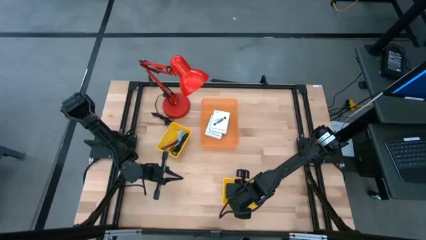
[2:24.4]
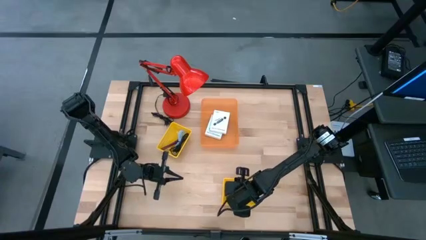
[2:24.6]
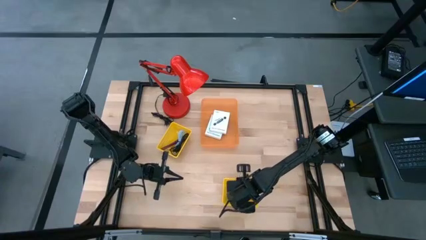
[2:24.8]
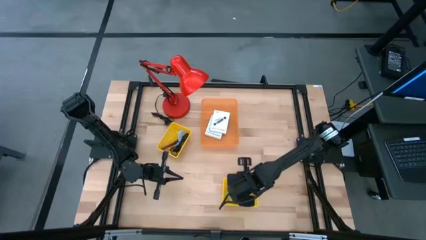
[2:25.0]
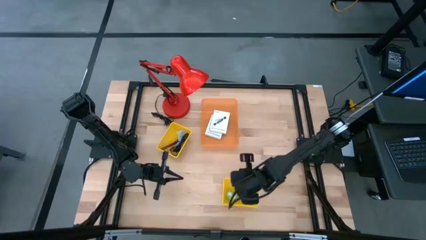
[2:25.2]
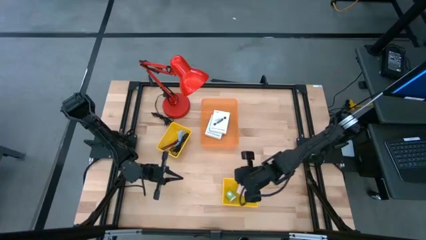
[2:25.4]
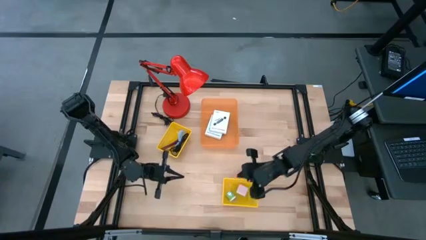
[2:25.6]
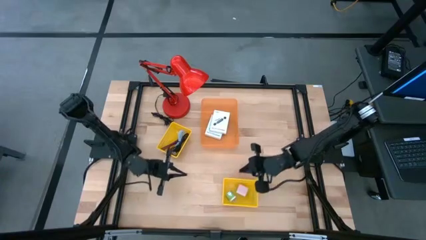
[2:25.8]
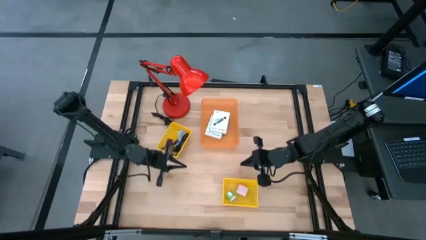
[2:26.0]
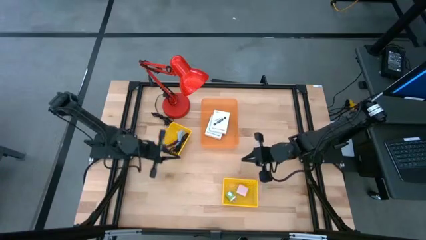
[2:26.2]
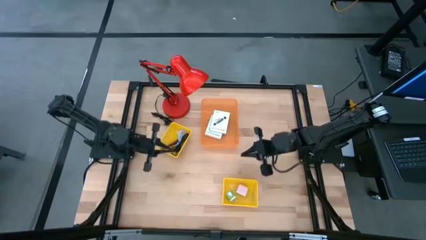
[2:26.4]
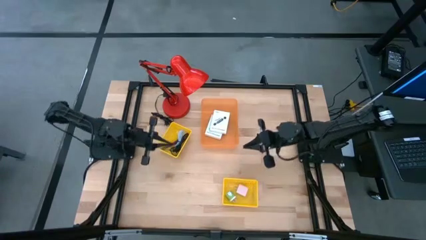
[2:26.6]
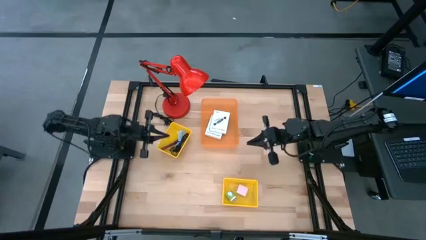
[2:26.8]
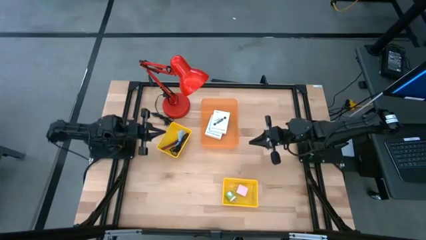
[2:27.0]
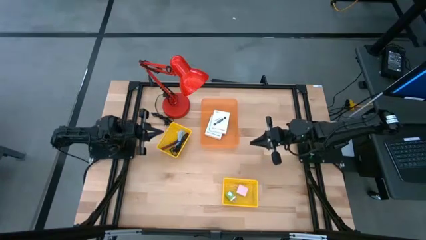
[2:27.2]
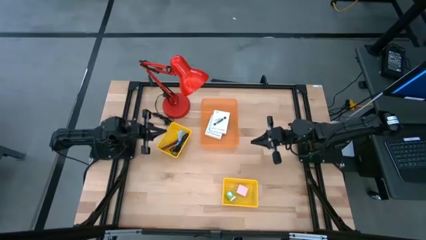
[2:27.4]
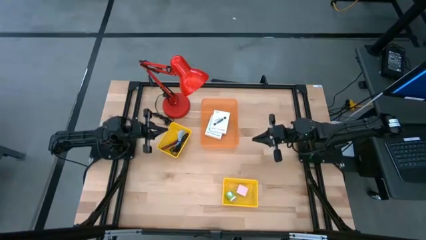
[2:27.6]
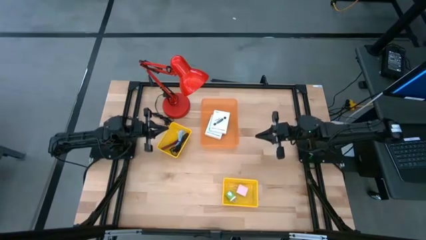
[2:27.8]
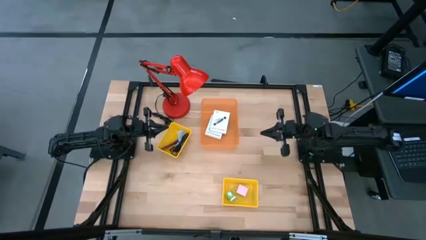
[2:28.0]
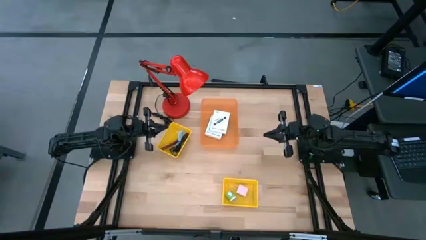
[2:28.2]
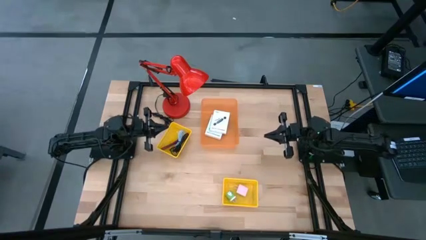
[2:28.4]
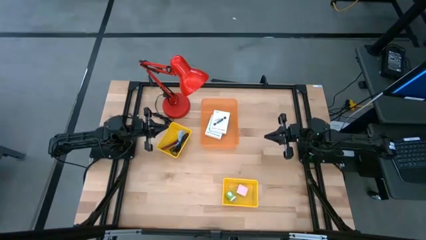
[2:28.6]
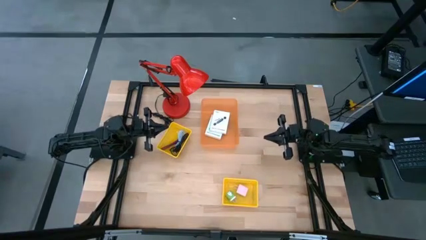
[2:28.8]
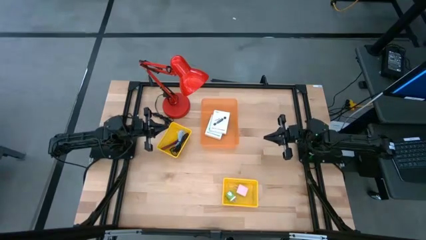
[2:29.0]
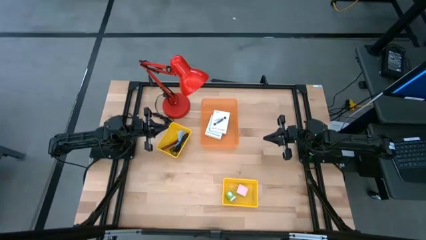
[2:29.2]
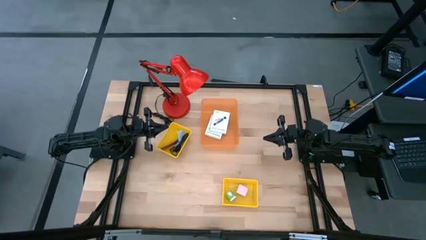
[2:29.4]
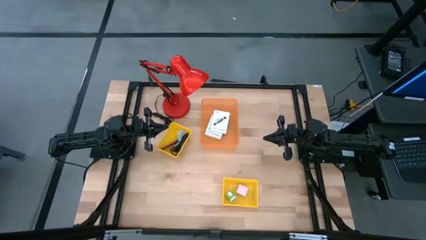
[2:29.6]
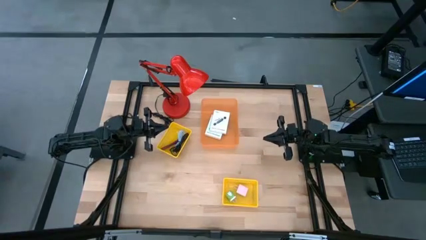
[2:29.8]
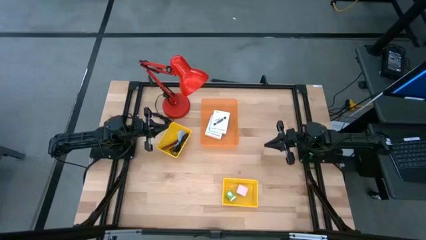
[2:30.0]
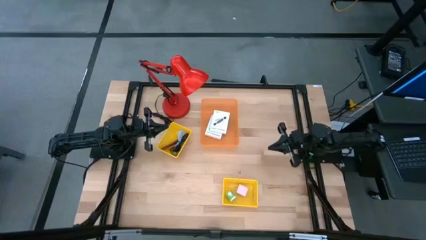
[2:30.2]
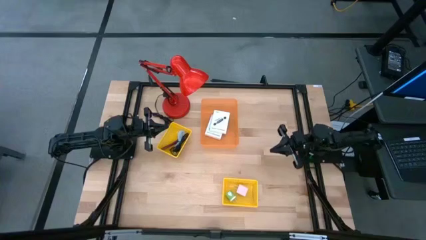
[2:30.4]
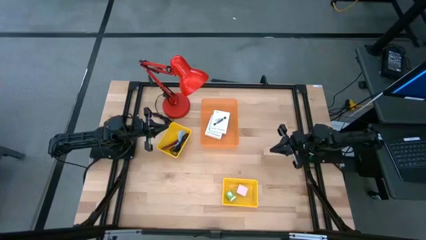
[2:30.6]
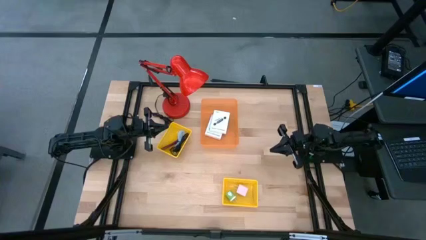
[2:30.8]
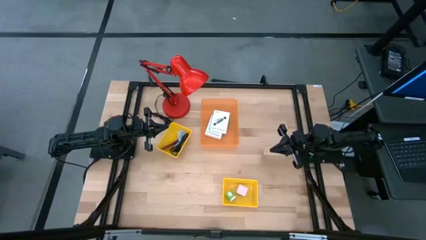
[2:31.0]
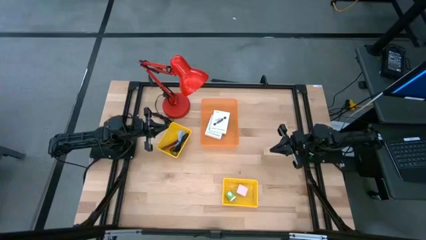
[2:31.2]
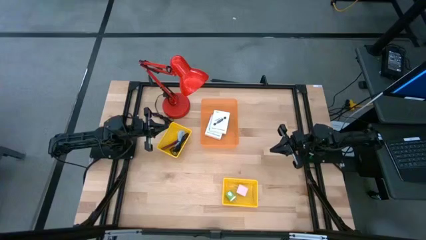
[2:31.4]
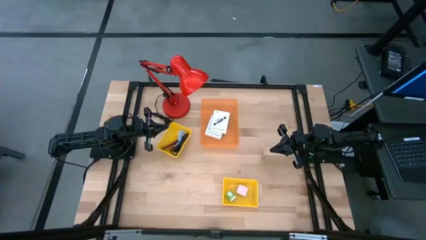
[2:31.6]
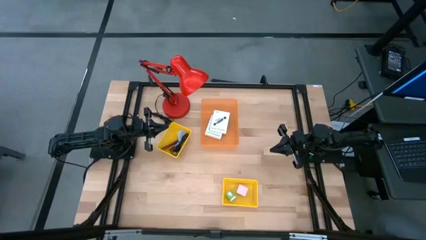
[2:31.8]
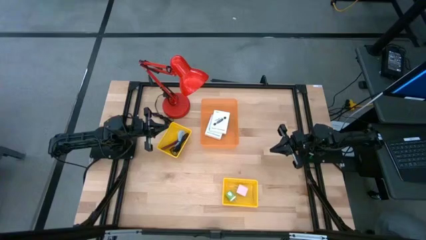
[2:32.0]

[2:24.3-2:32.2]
Task: Pick and place items into bin
Return to Home Position

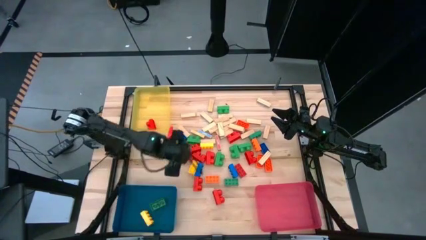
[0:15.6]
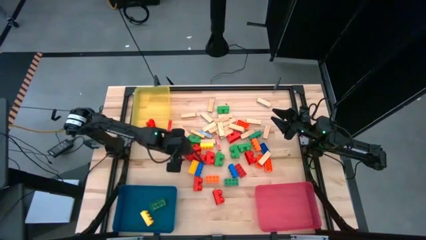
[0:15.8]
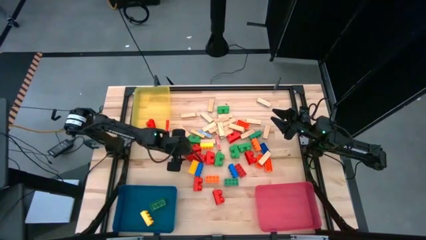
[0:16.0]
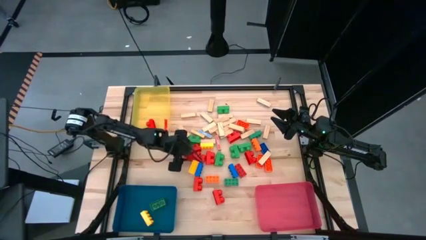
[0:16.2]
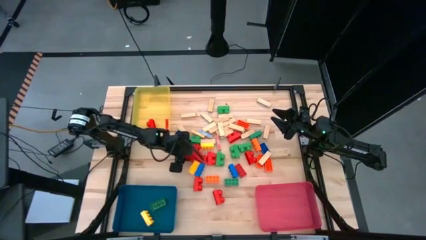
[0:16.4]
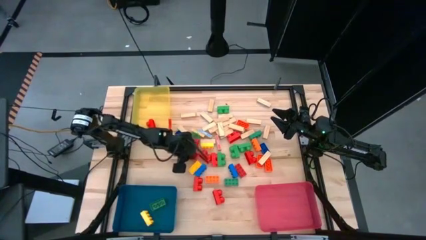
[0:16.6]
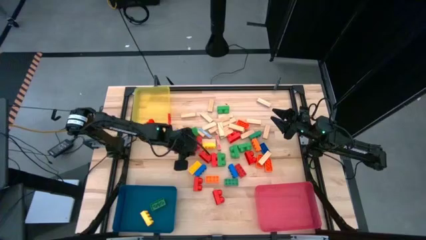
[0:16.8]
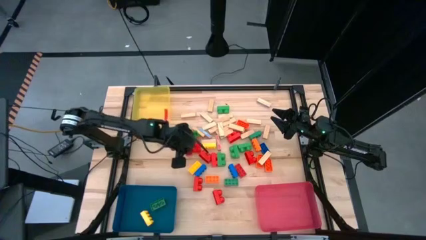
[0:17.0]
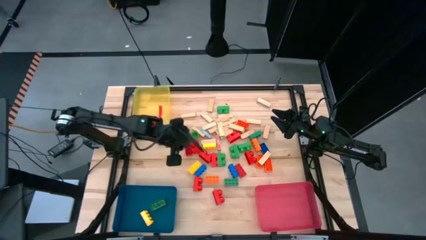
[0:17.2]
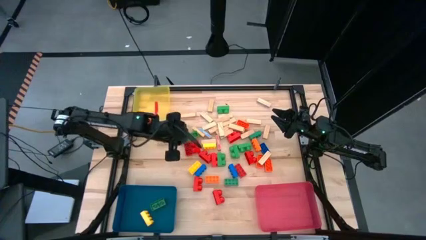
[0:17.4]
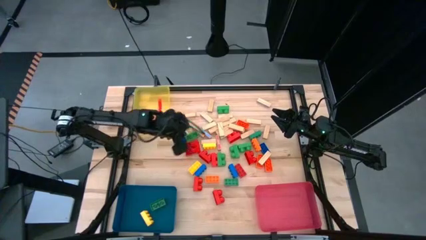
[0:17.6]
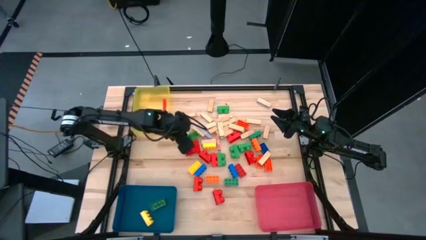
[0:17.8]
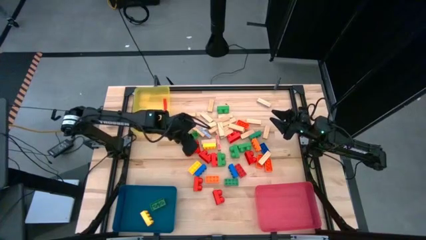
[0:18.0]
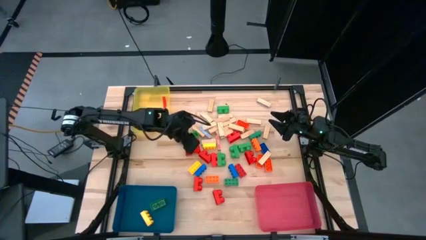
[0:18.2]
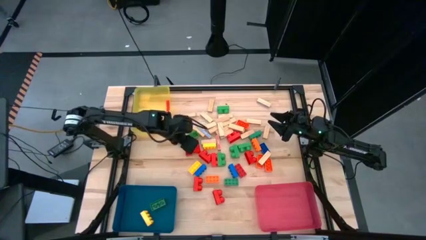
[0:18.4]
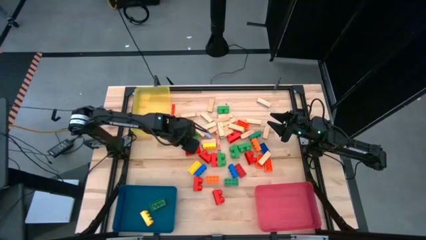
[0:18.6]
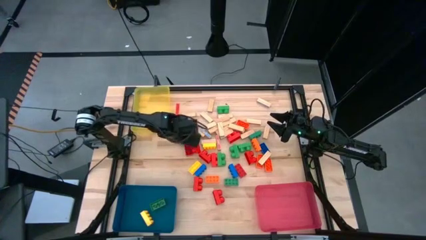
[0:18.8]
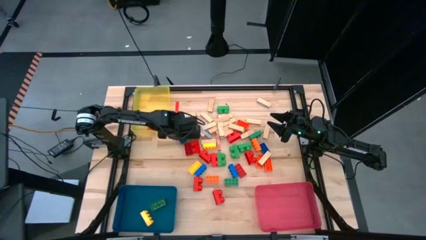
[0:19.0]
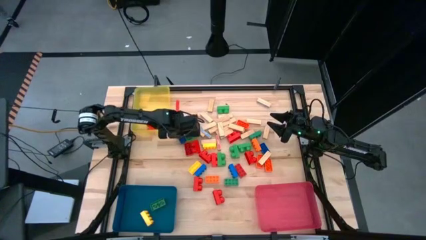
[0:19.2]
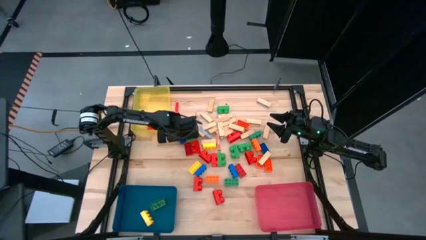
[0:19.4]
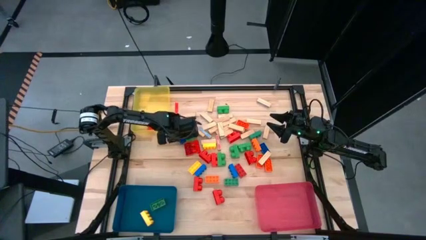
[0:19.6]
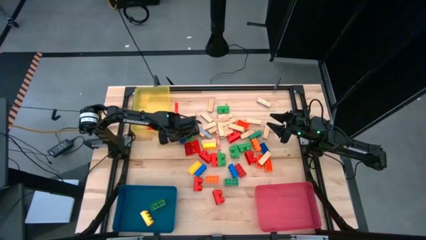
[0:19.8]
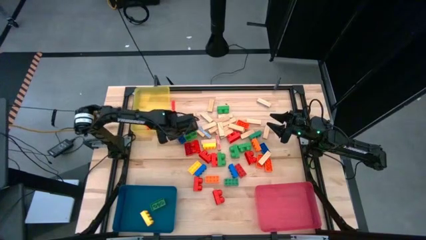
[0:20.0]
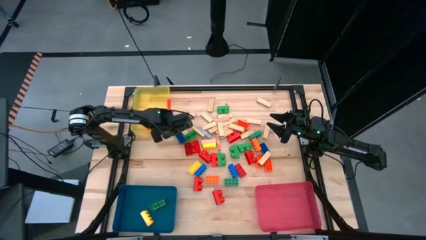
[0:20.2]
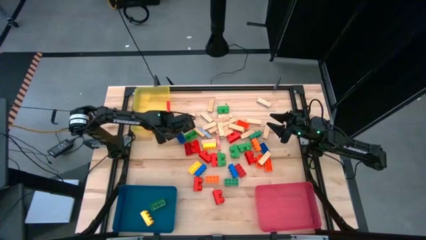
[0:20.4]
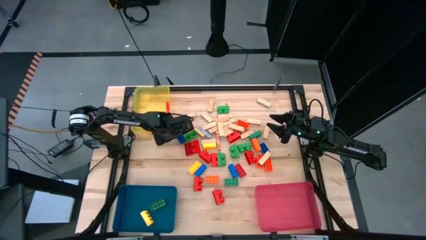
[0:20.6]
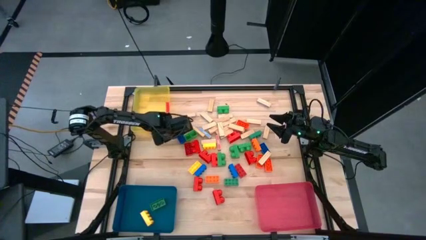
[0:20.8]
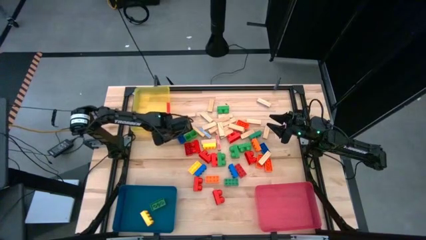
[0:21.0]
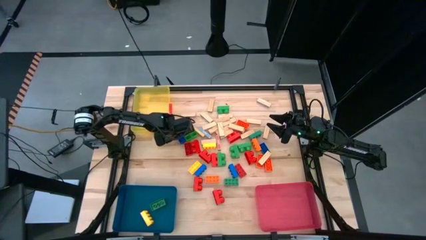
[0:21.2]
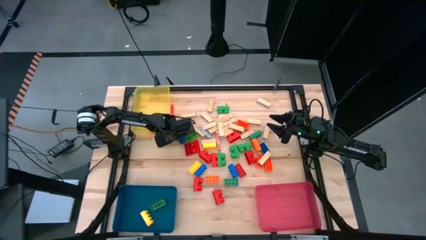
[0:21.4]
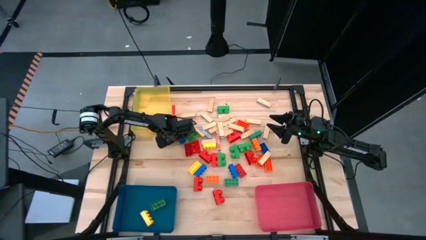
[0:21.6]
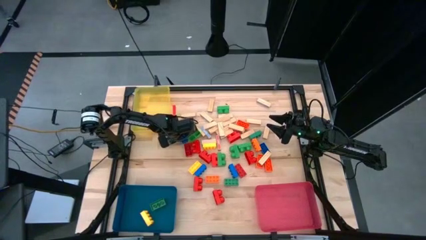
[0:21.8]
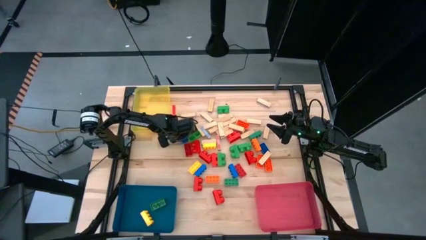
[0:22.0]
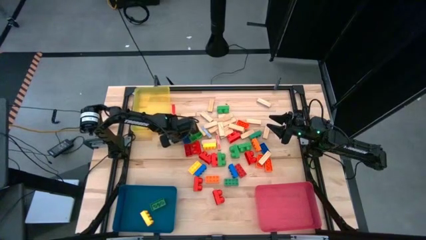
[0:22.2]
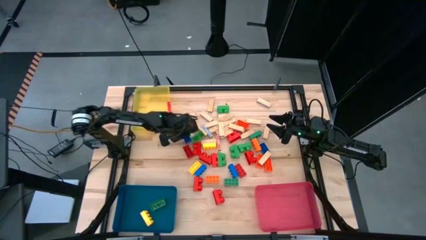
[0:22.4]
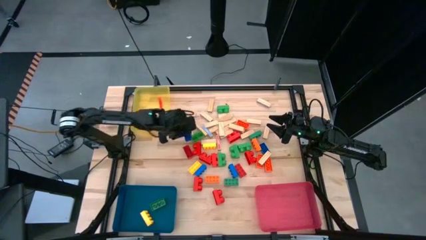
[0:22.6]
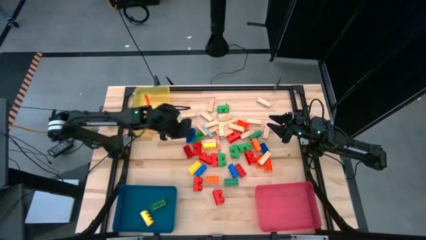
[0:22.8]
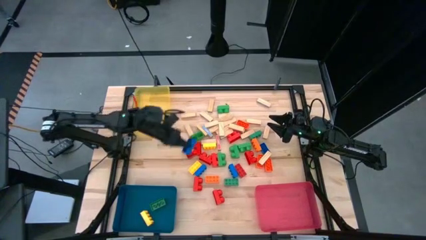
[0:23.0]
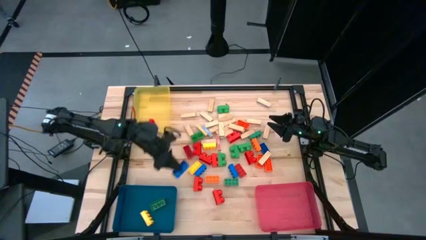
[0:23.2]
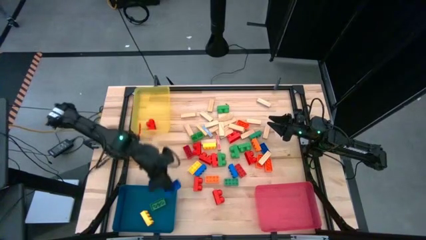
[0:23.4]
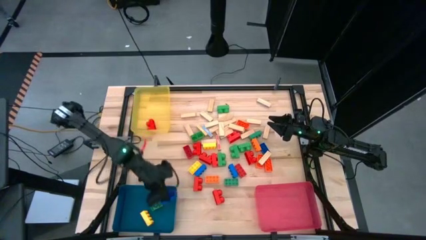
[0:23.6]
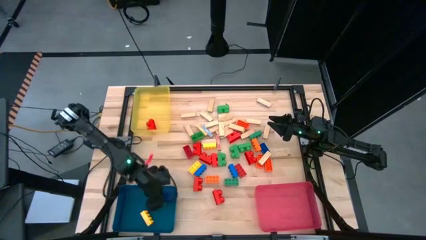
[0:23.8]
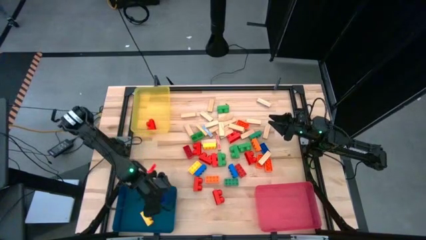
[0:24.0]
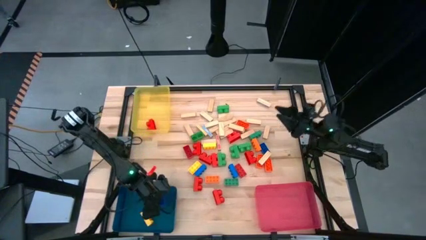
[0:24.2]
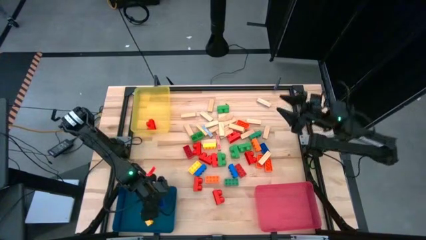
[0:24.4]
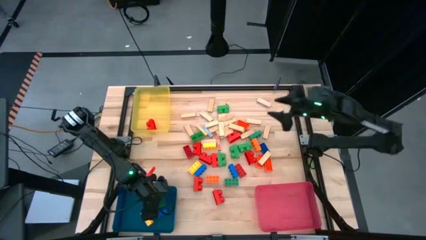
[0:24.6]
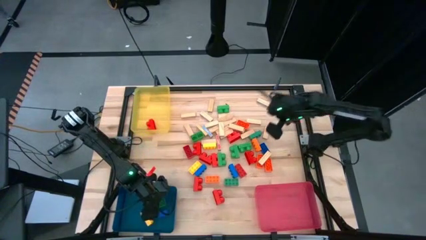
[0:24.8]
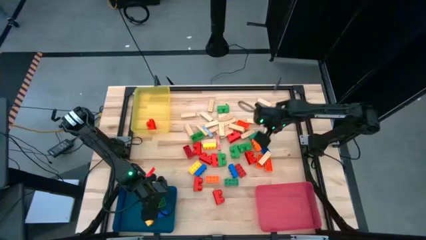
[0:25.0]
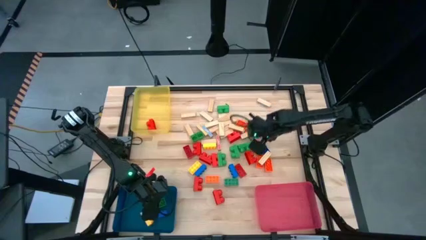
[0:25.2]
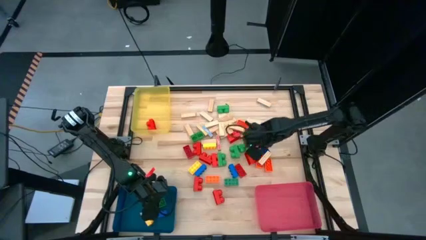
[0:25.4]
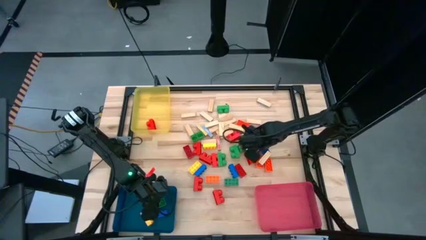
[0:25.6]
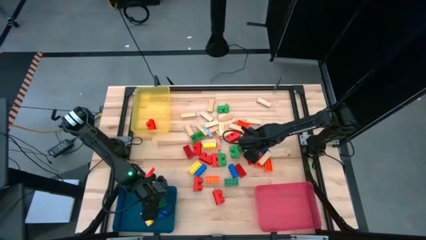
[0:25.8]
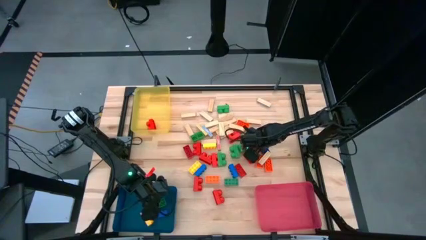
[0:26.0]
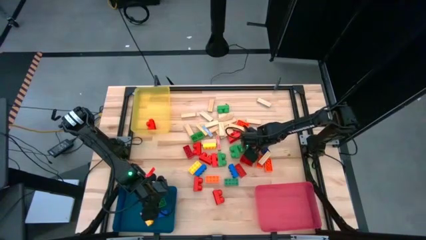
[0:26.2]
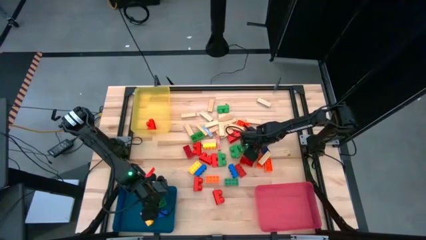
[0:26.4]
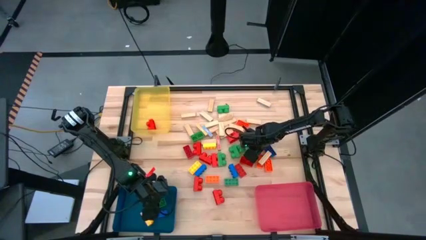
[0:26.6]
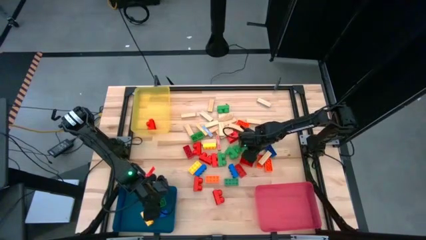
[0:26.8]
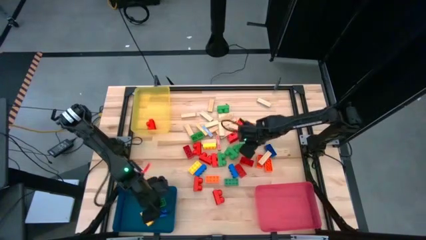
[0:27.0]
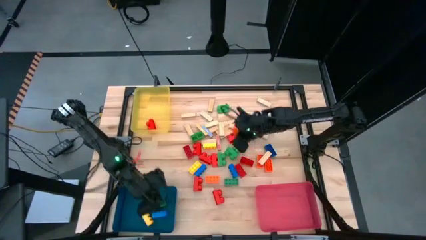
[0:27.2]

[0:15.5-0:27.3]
Task: Sort blocks by size
Put the blue game piece into the blue bin
